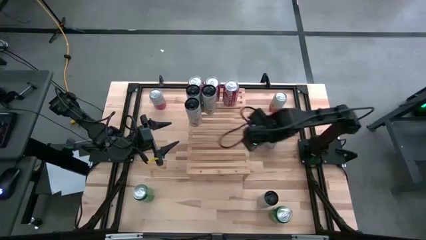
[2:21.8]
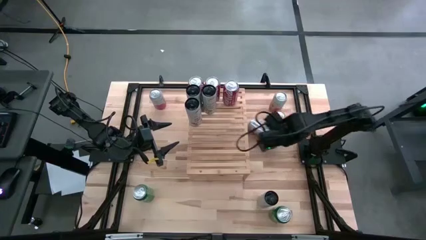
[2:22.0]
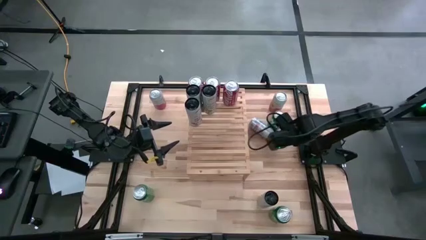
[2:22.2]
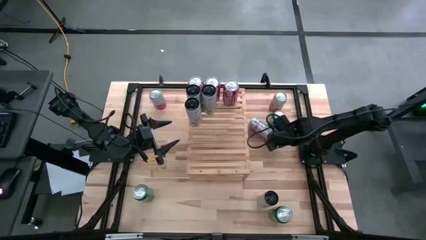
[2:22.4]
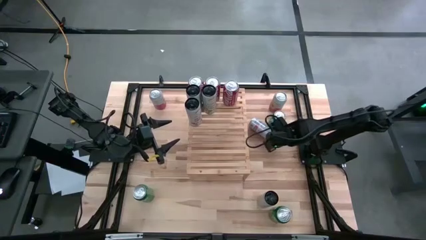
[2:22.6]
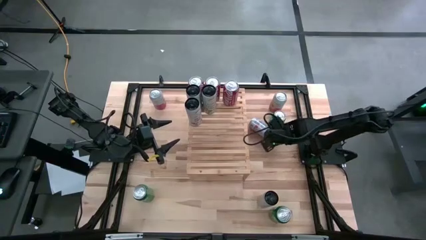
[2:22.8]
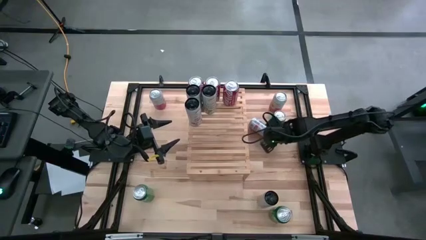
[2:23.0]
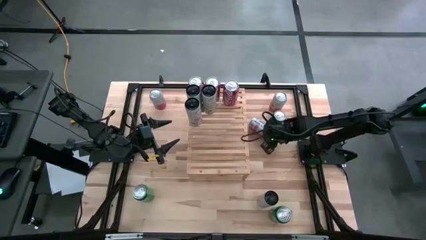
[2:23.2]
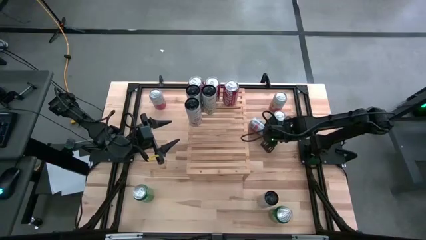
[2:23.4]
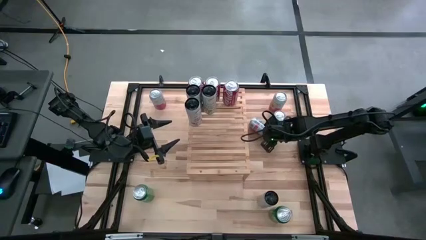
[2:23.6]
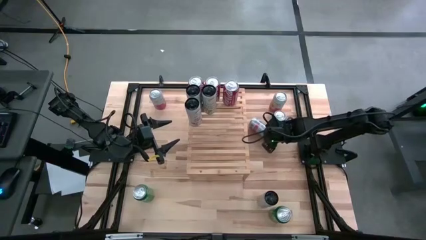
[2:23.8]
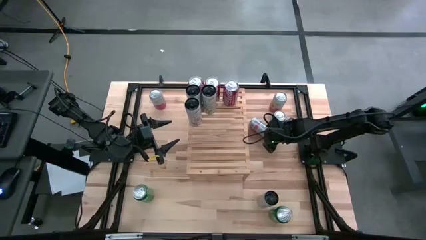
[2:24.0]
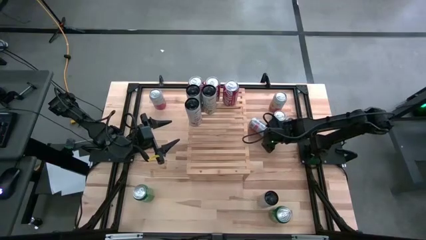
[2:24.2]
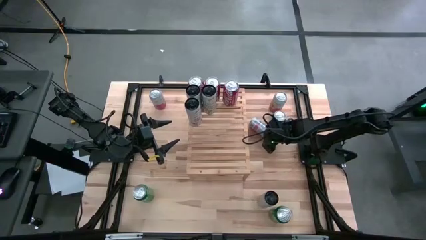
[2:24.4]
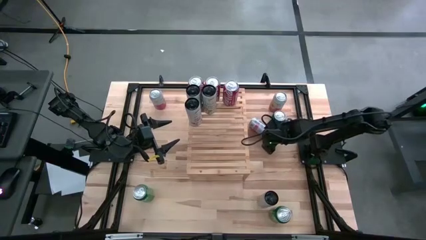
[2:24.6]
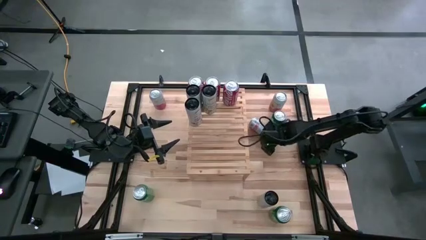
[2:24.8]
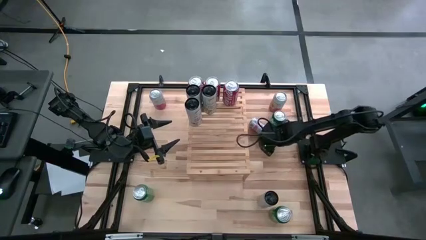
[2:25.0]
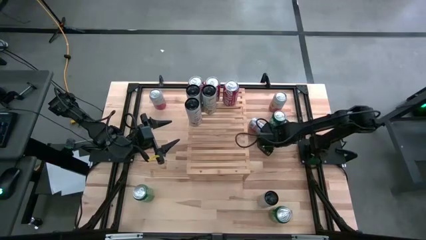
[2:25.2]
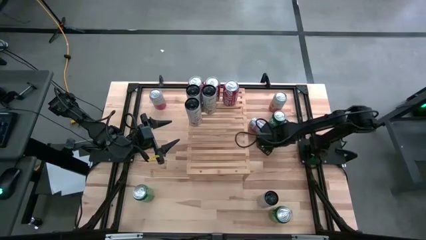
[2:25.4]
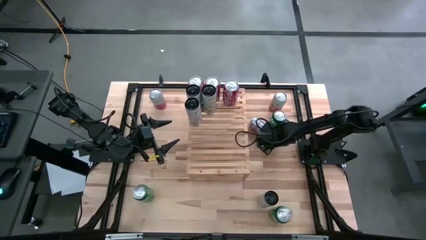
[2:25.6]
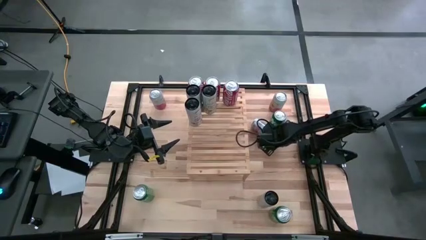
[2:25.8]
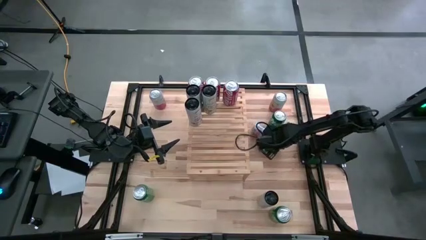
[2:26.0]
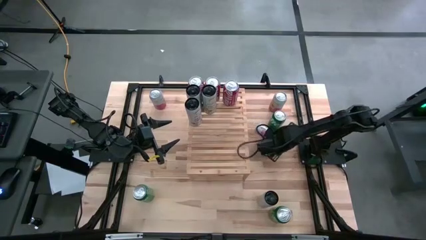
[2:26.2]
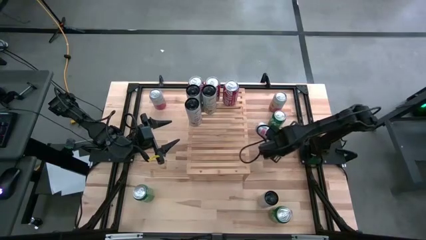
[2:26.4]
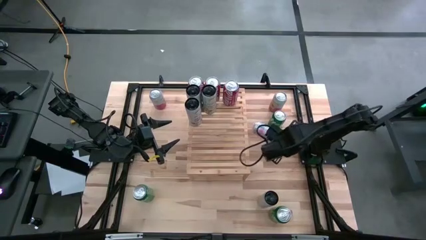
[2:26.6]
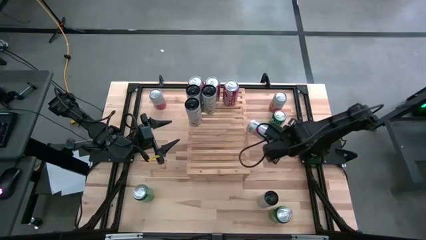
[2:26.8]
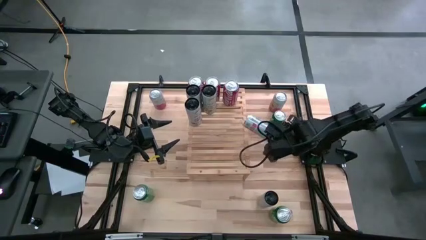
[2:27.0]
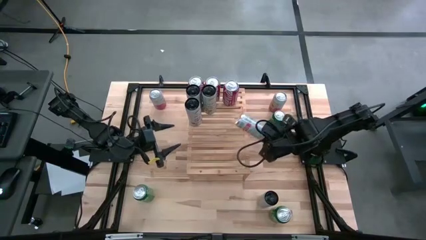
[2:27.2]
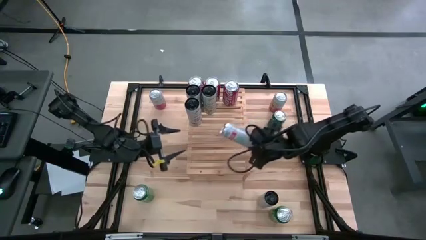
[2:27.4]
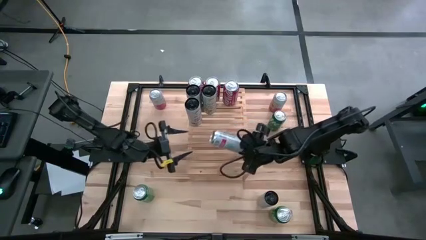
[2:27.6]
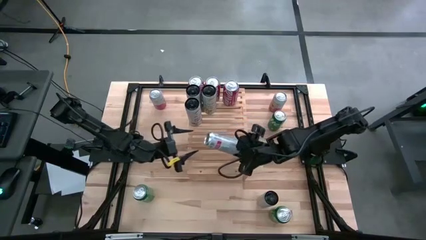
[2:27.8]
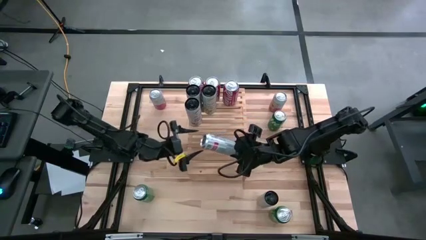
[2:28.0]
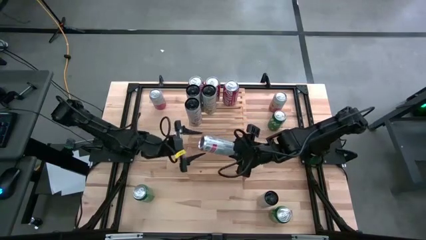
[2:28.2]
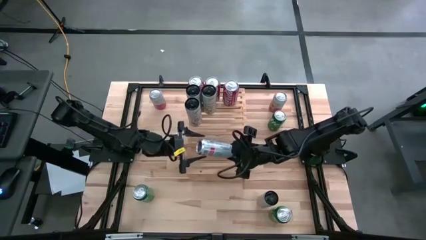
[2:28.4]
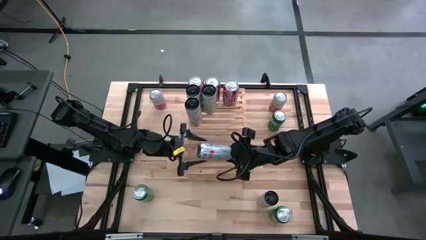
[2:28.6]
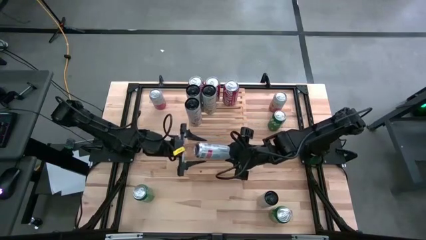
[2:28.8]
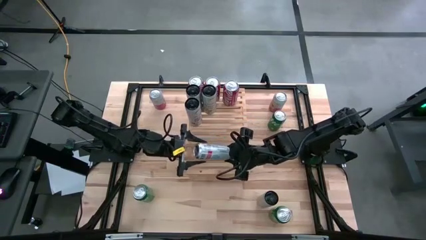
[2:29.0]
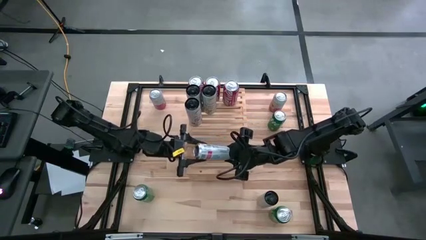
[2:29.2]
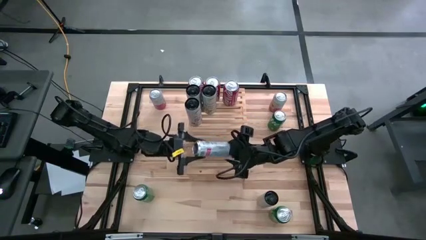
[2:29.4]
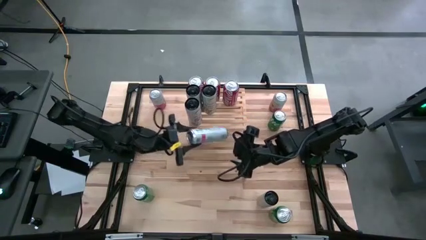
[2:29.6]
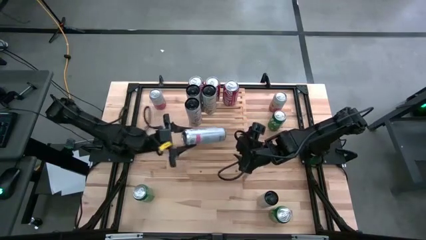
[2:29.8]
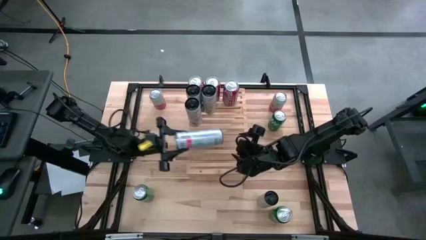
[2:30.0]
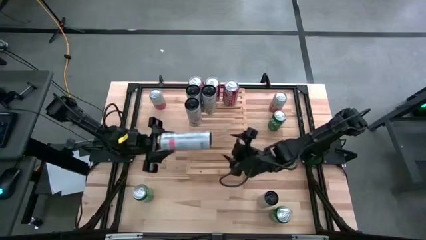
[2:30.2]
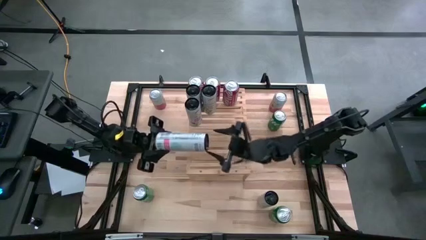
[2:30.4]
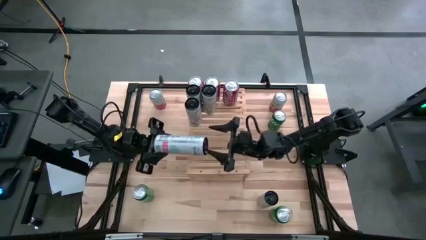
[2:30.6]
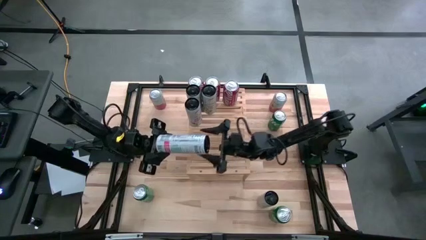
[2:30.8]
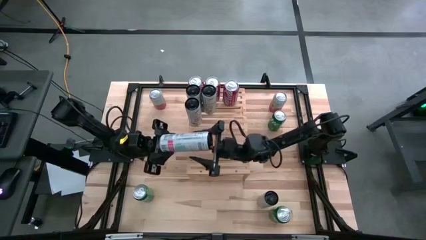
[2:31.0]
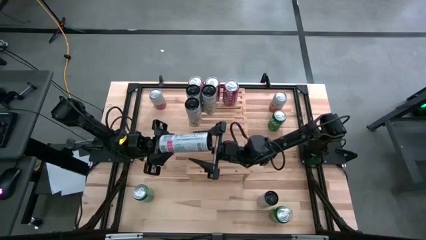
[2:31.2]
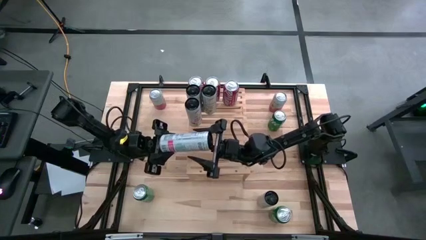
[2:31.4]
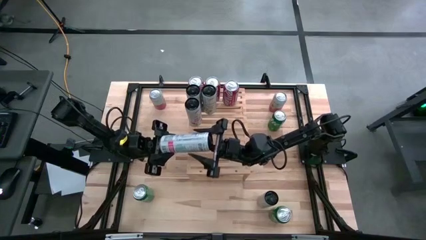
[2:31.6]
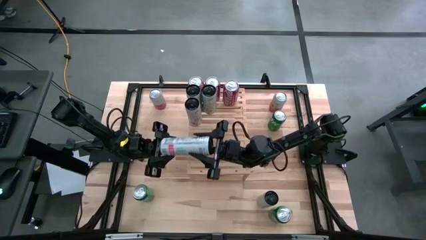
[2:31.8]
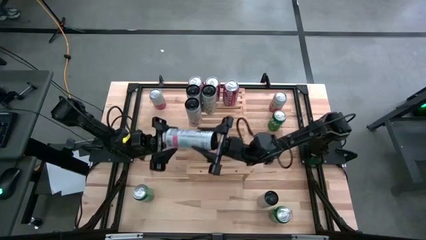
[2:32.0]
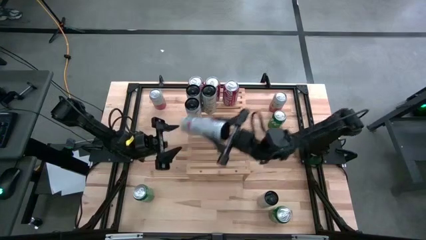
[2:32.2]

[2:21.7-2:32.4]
Task: Place canned beverage on shelf
Align the right peach vibe celsius soda can with the other peach vibe celsius soda can on the shelf

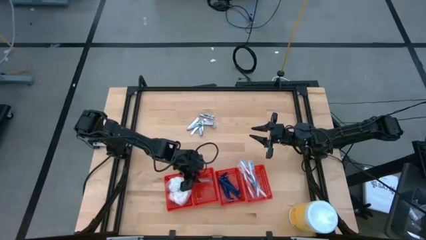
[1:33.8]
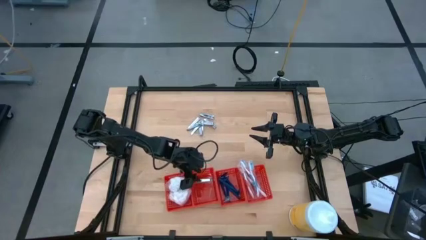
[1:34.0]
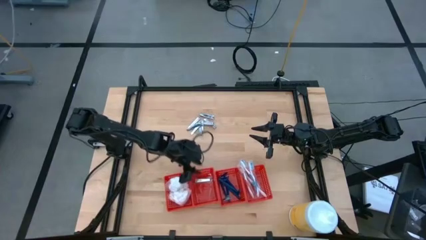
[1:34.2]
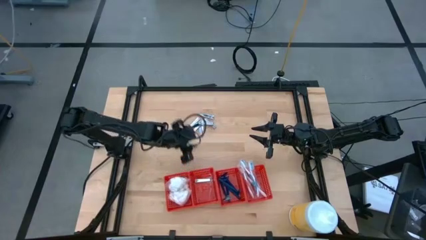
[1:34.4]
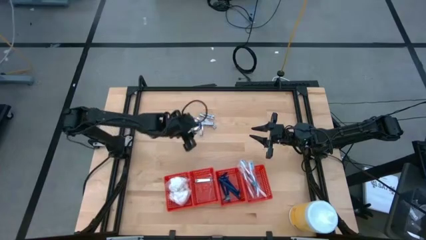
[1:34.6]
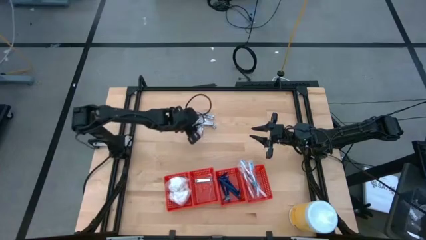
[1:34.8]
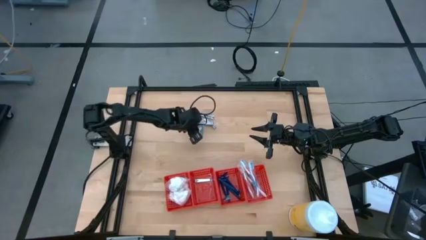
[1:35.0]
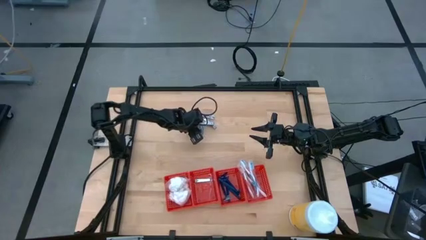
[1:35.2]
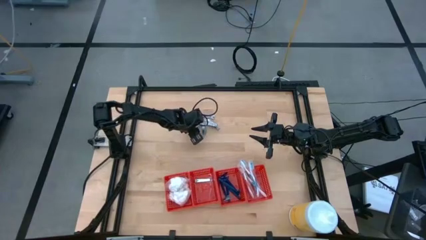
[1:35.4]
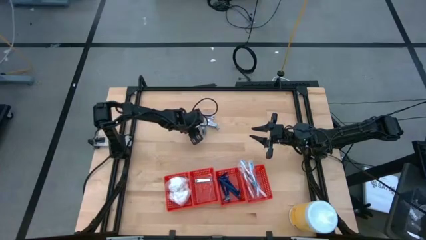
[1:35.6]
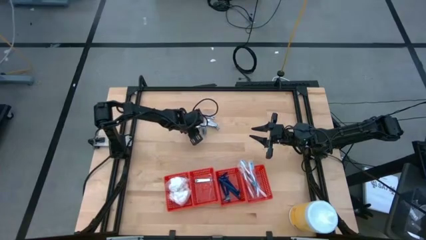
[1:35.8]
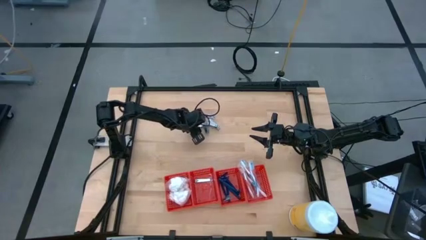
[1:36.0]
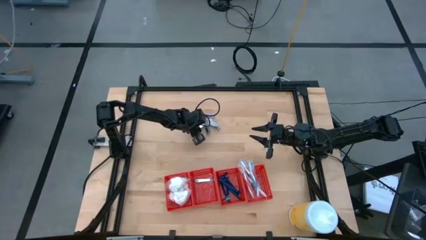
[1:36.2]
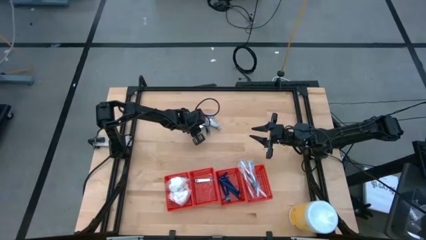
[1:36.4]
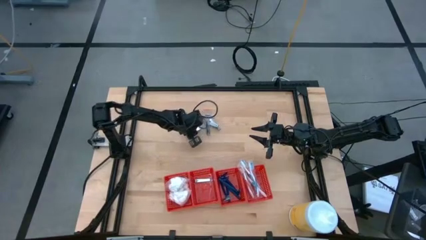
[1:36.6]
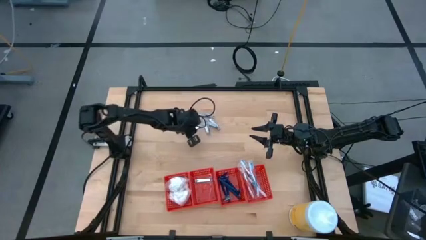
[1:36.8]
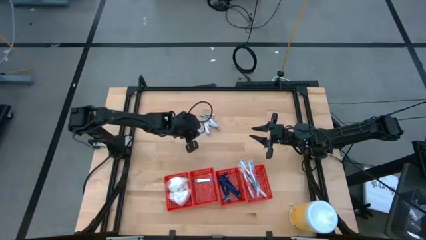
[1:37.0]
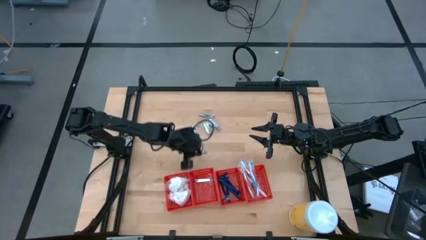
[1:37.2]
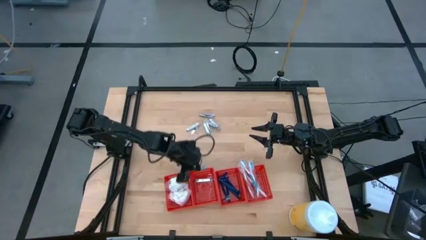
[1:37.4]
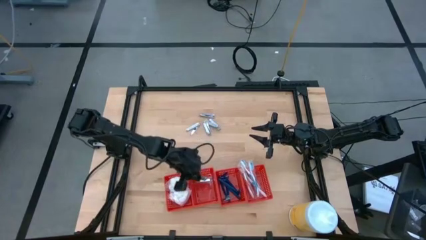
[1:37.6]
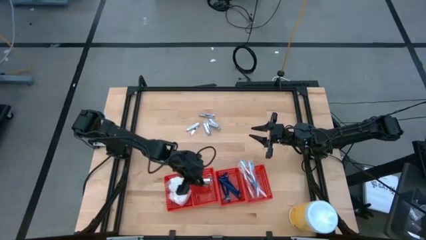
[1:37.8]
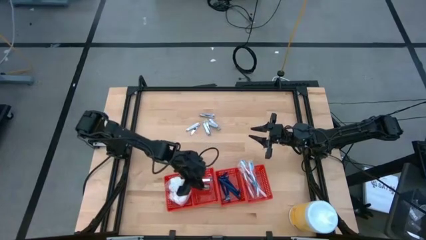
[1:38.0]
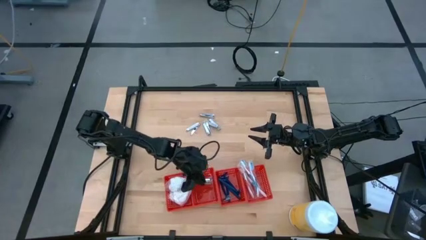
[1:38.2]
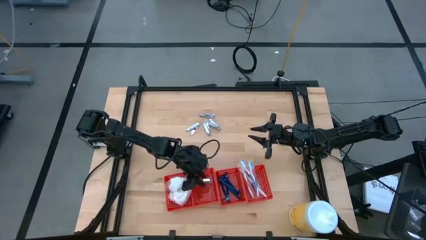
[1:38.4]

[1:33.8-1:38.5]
Task: Pick & Place Travel size toiletries
Put the silver nail cutter into the middle left red bin
